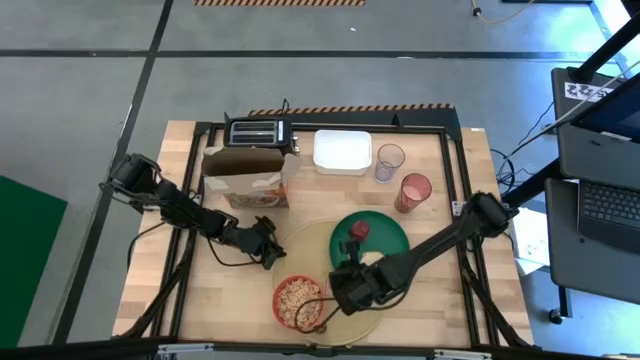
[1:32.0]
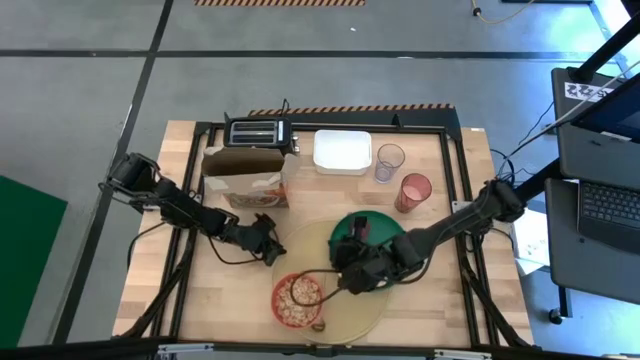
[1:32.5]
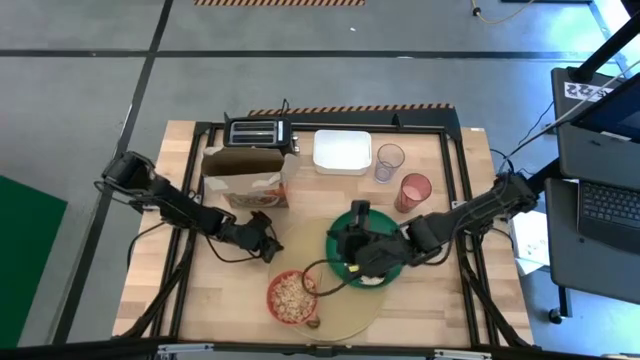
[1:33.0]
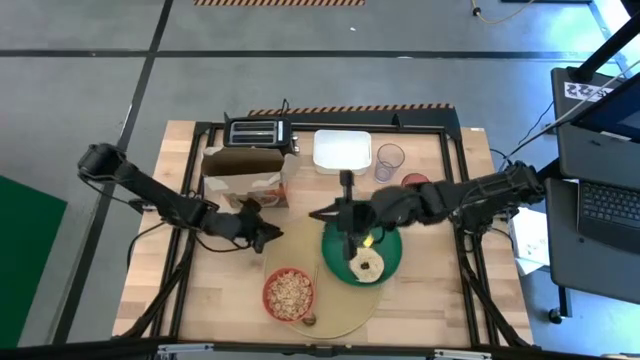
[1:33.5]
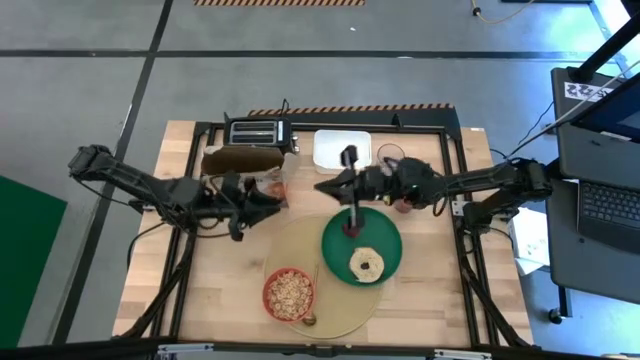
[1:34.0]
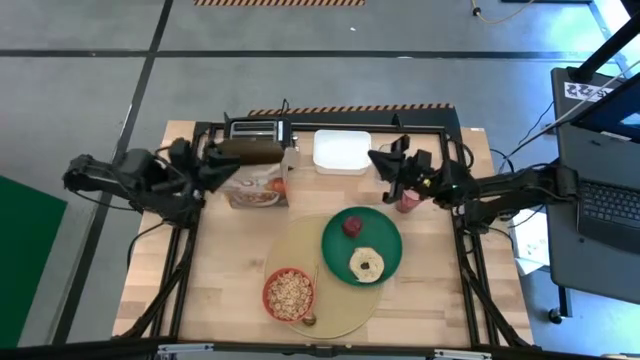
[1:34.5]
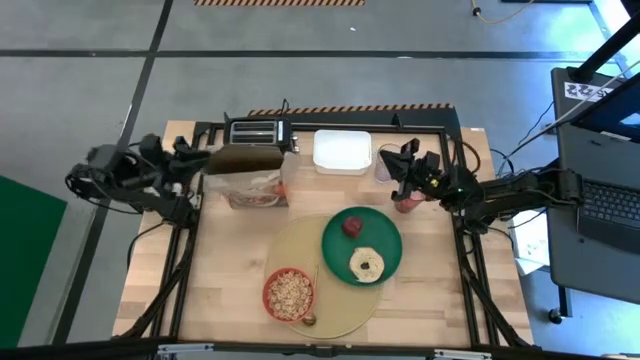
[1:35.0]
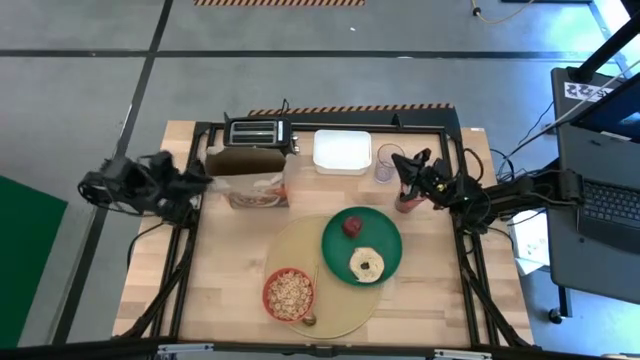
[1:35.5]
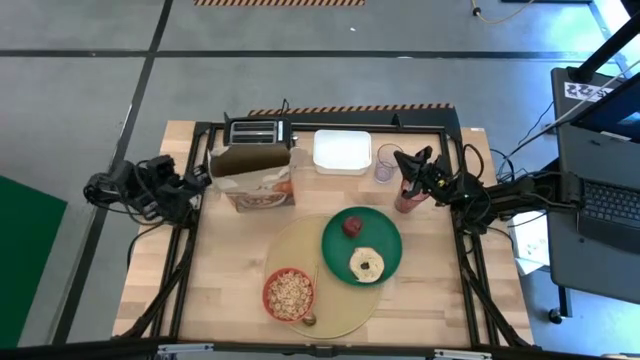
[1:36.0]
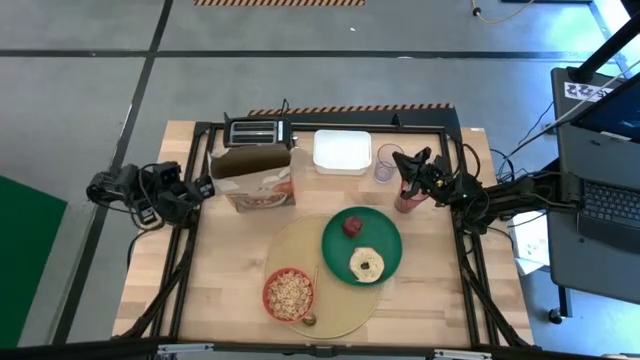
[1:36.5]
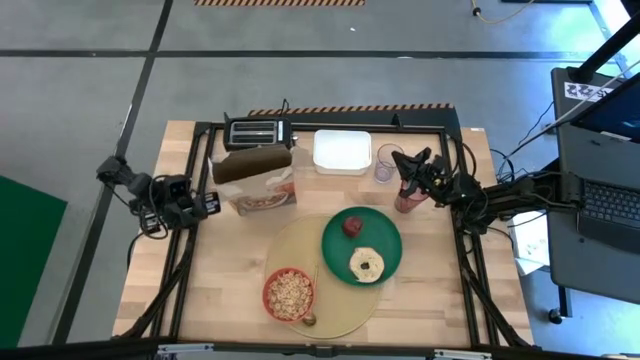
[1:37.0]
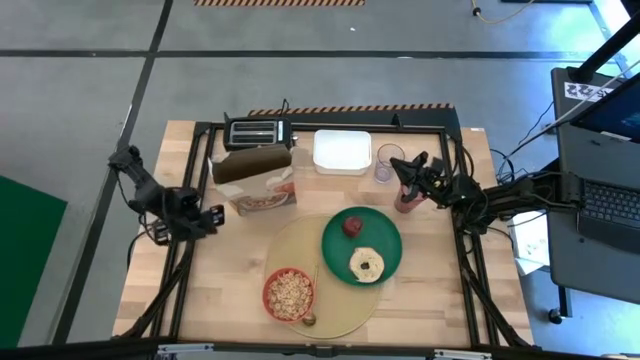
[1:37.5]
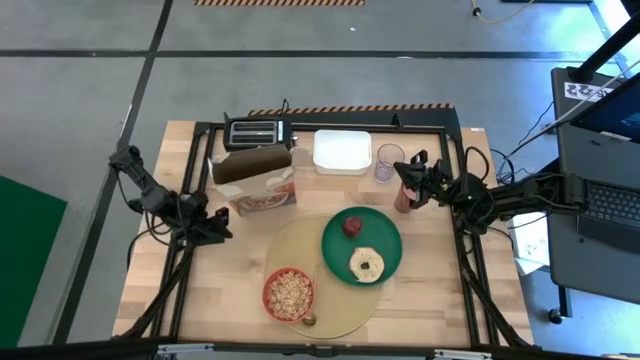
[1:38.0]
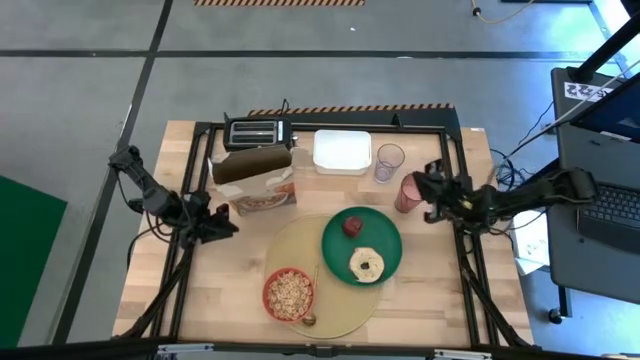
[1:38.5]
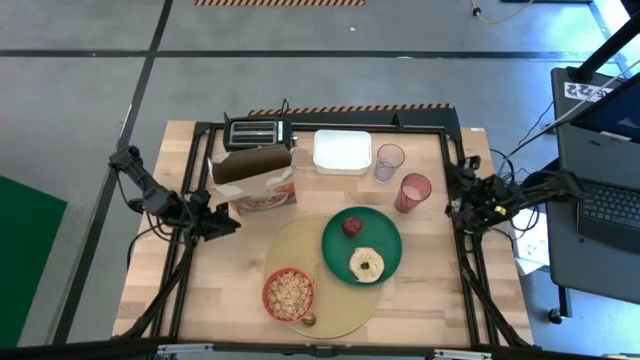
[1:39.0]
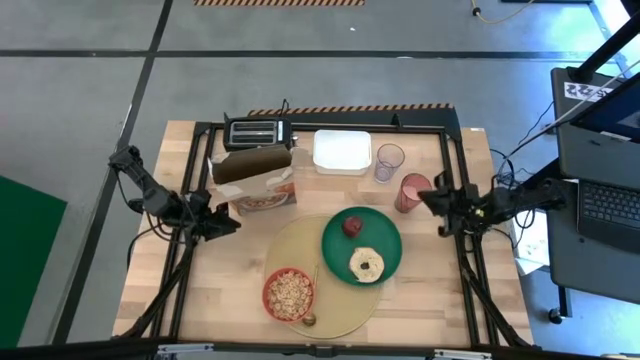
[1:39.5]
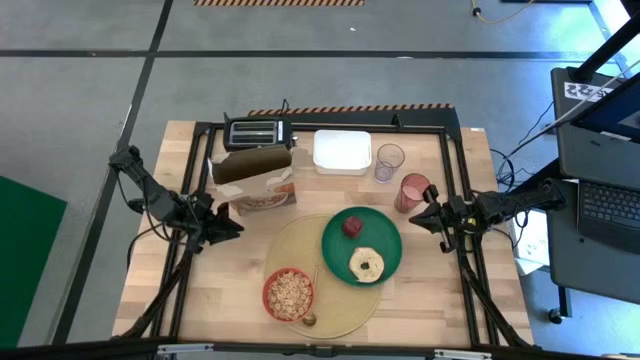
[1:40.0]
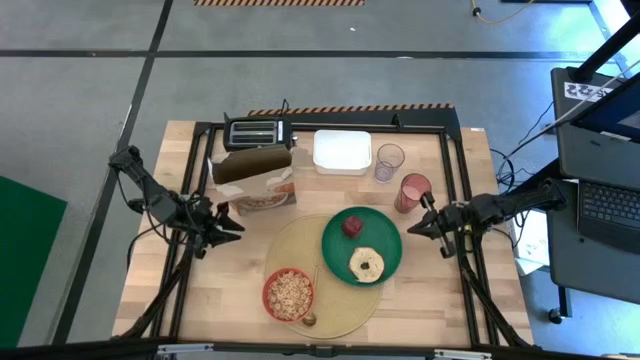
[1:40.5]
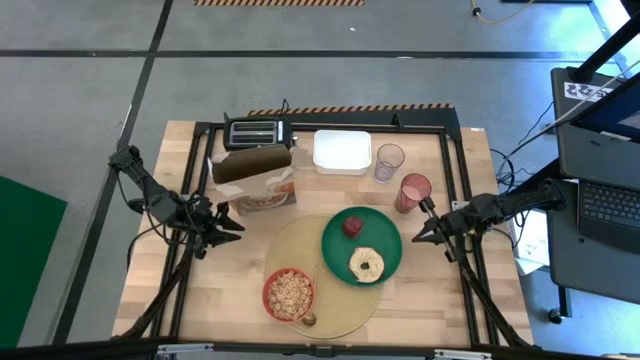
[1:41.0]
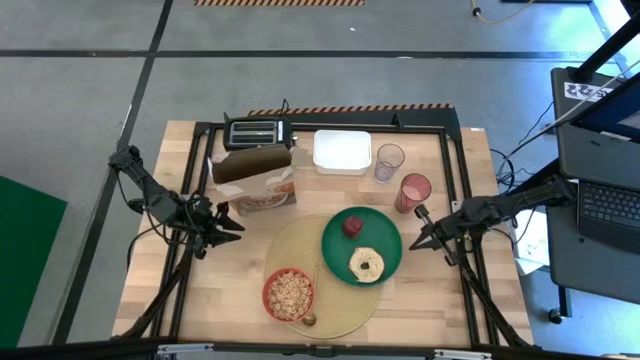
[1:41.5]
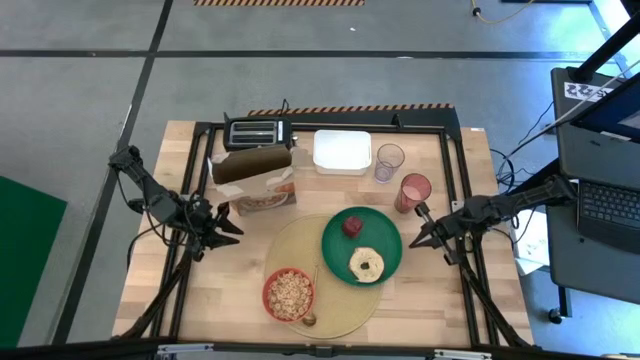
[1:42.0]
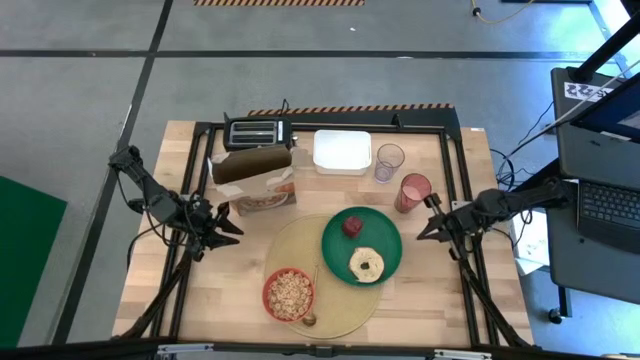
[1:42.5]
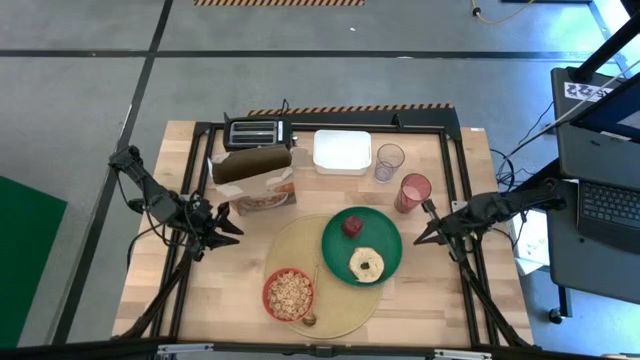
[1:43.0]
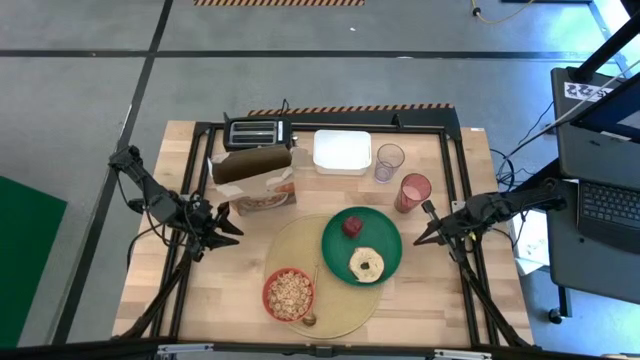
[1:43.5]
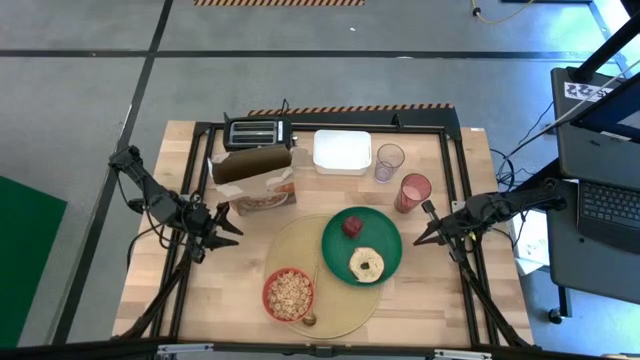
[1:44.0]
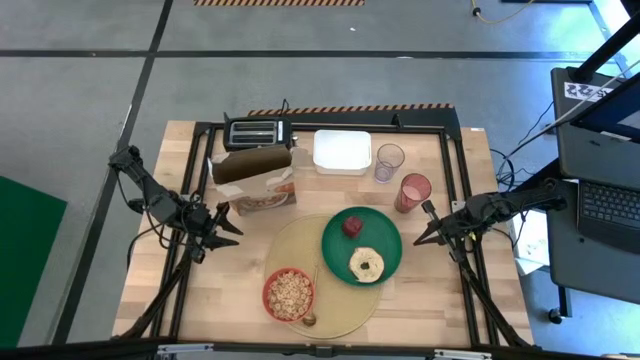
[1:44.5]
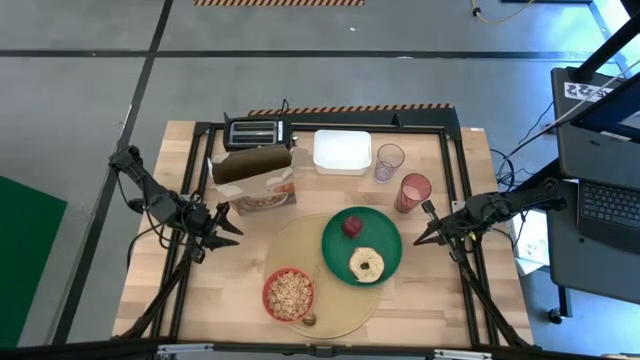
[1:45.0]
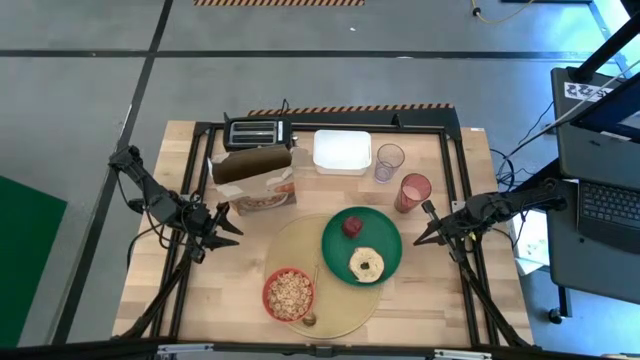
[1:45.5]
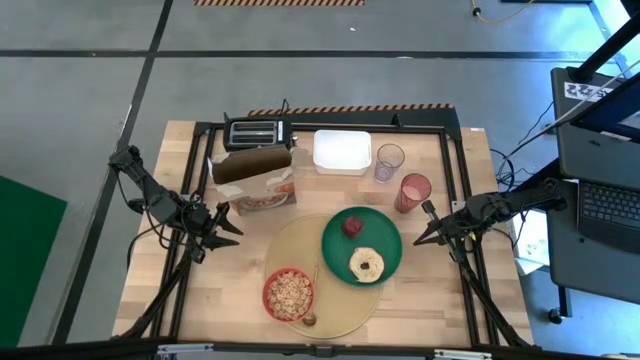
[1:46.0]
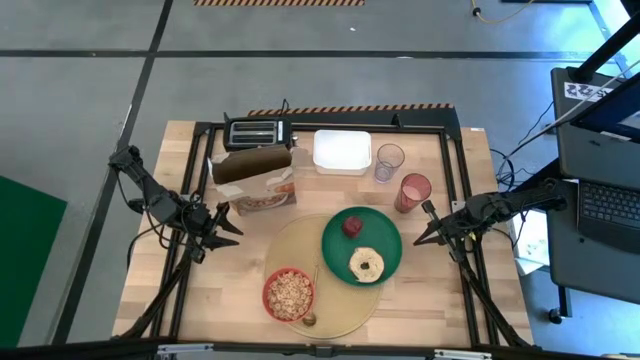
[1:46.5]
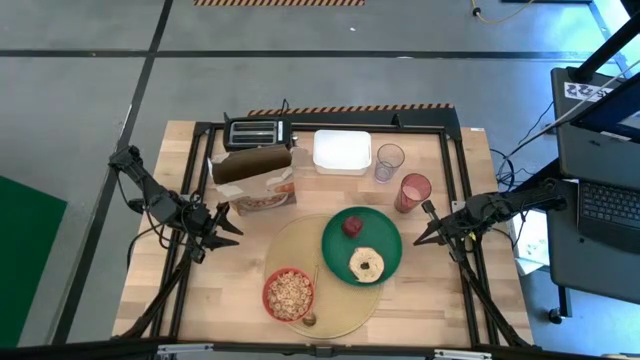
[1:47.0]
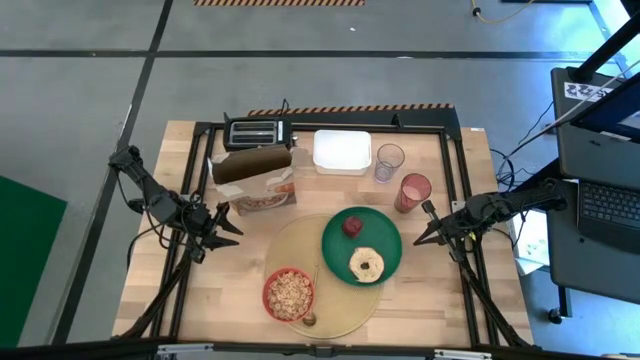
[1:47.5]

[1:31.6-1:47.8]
Task: Arrange a breakfast setting
Return to Home Position

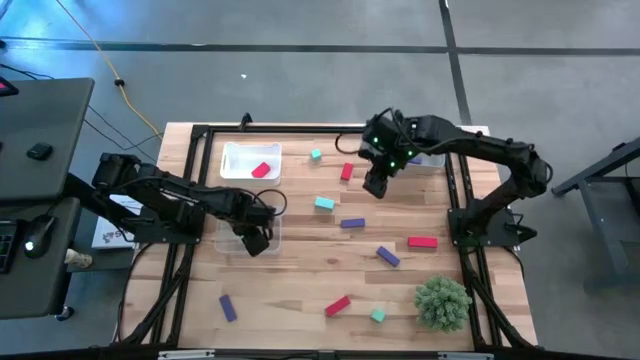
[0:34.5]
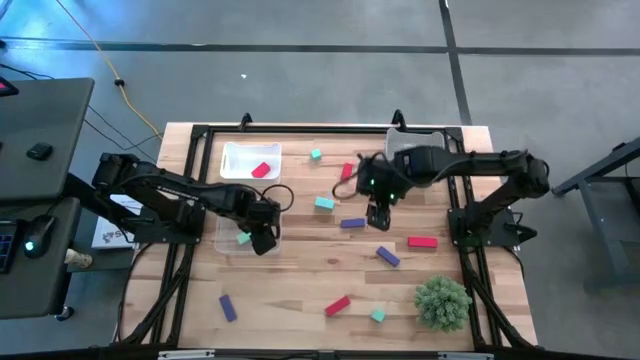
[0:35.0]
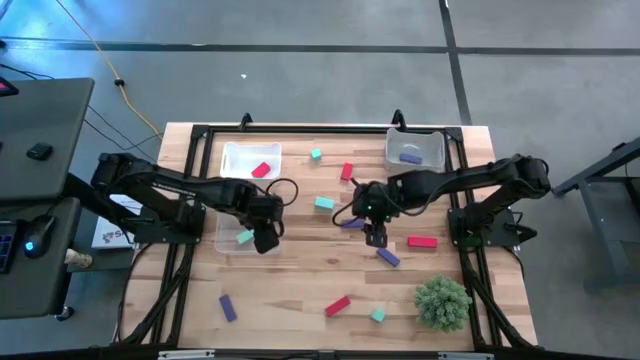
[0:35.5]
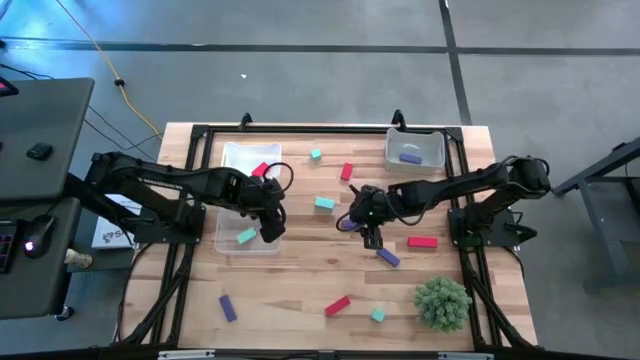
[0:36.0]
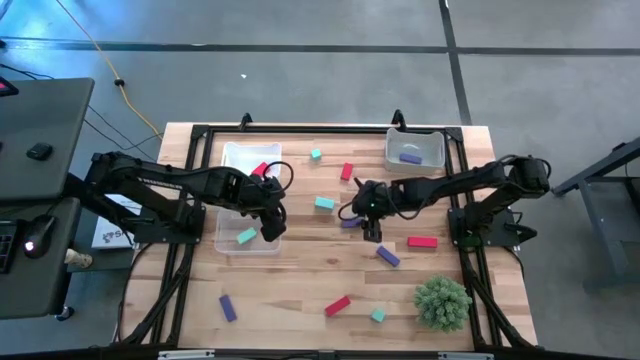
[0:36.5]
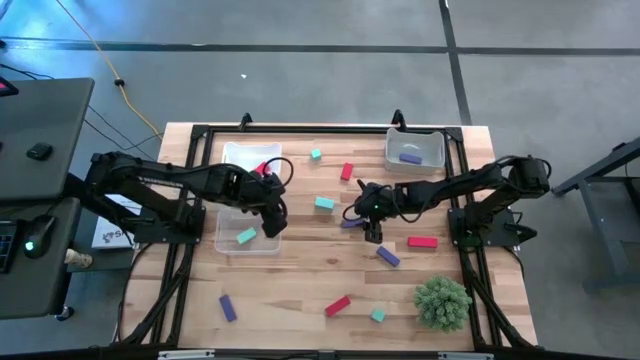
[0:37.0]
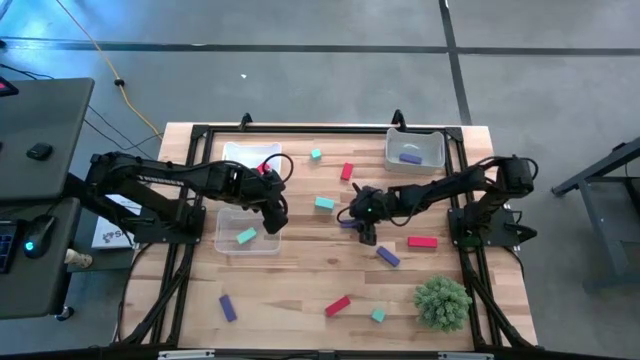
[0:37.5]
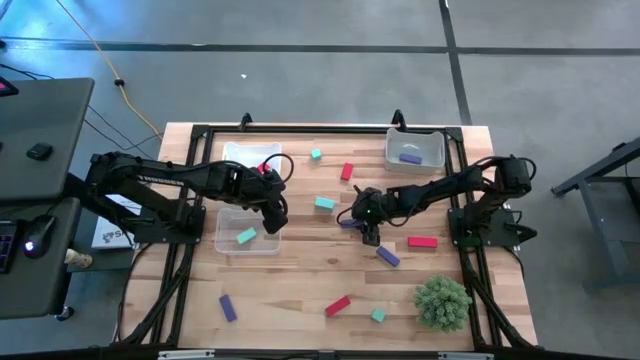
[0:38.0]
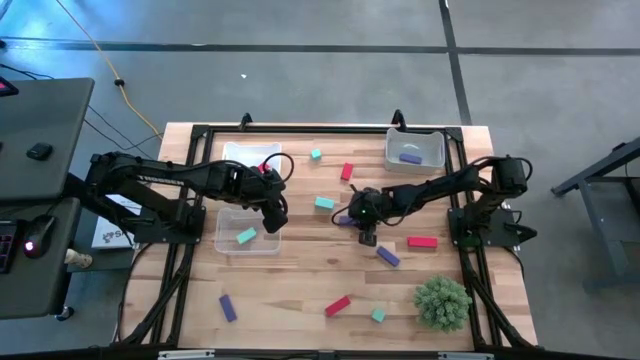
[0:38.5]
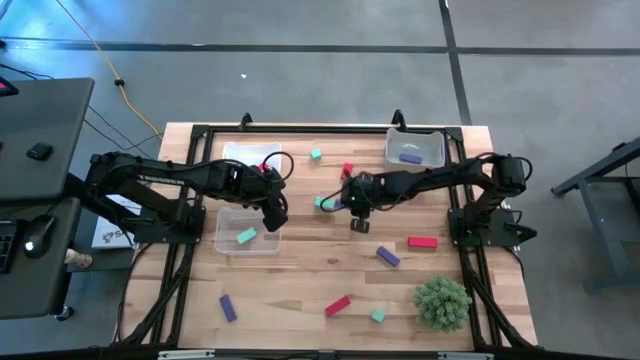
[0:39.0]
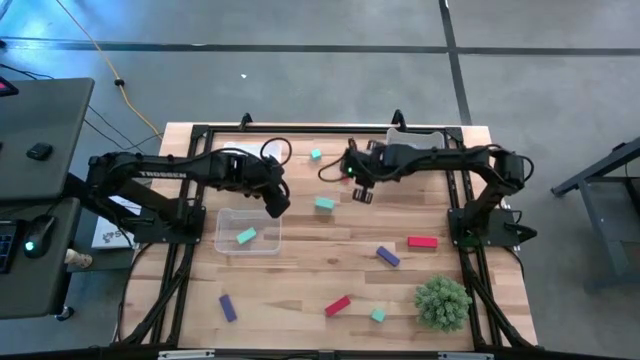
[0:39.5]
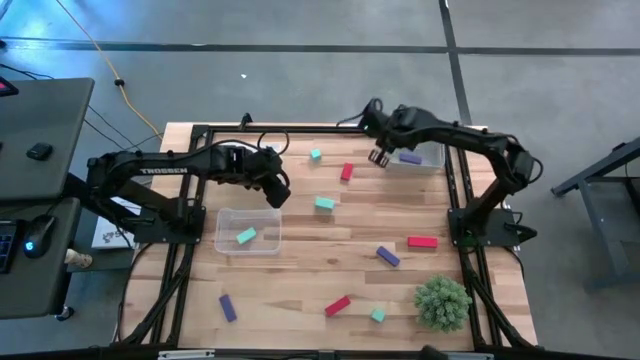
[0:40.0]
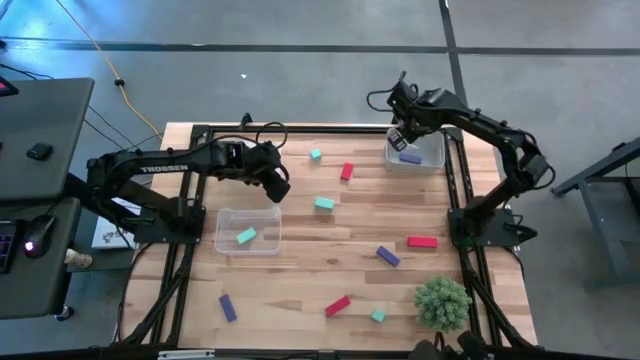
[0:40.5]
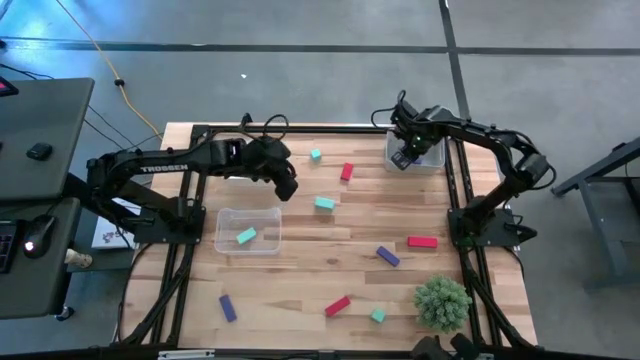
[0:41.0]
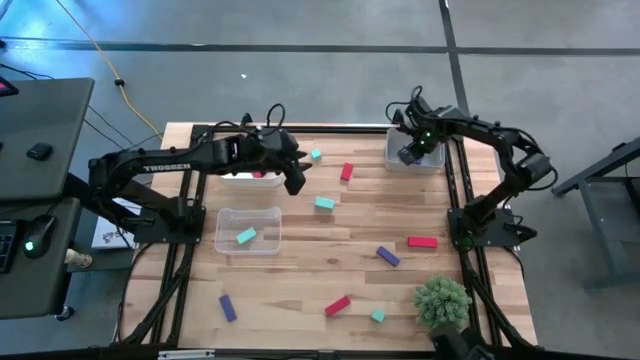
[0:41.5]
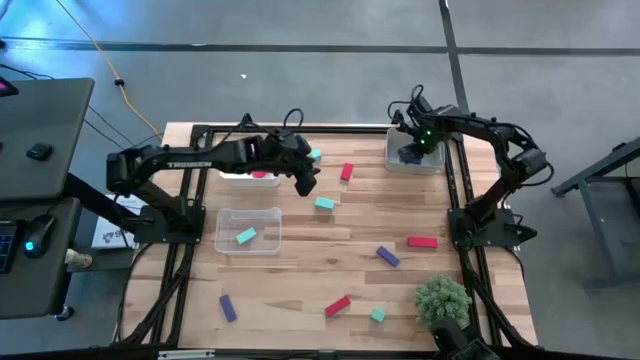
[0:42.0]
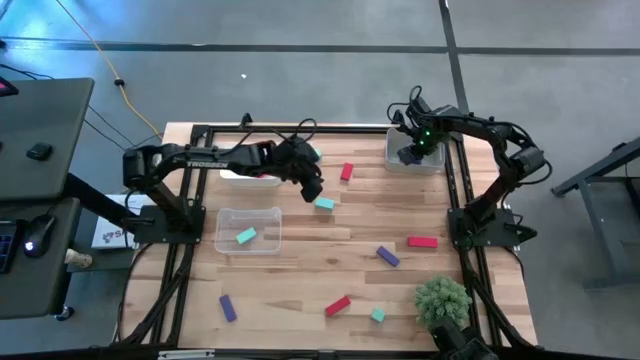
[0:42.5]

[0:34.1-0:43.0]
Task: Sort & place blocks by color
Put the violet block into the gray bin
